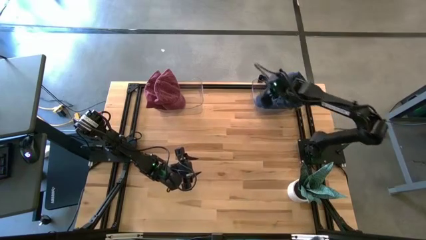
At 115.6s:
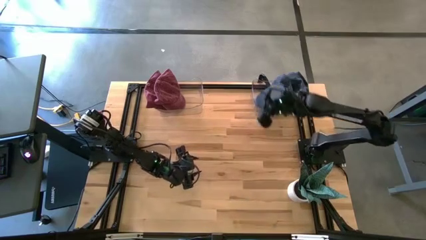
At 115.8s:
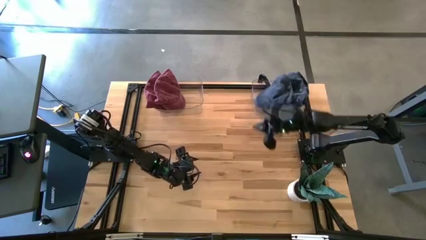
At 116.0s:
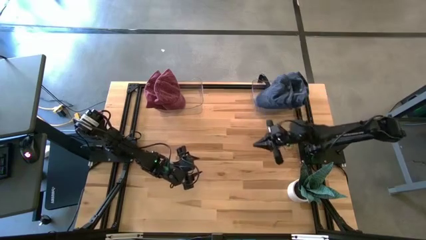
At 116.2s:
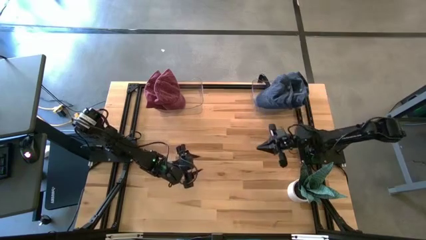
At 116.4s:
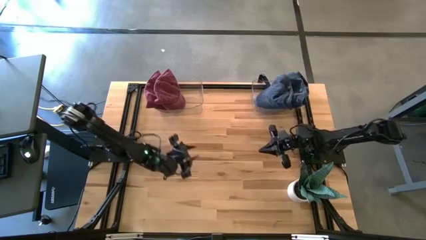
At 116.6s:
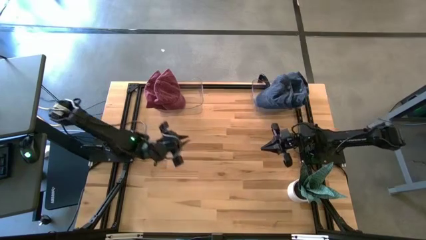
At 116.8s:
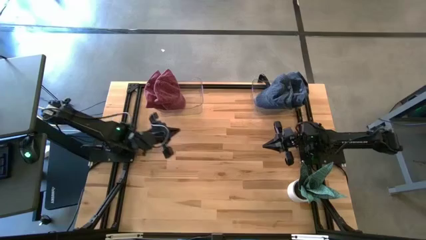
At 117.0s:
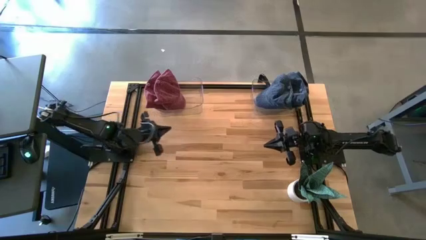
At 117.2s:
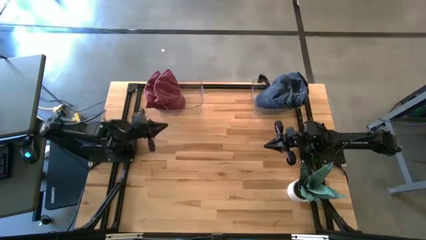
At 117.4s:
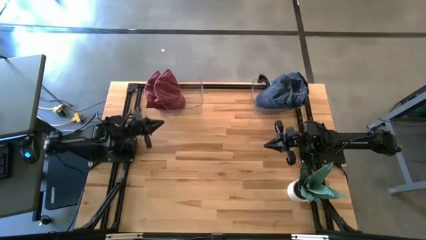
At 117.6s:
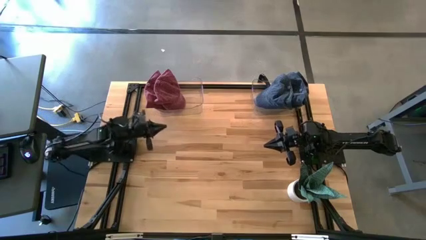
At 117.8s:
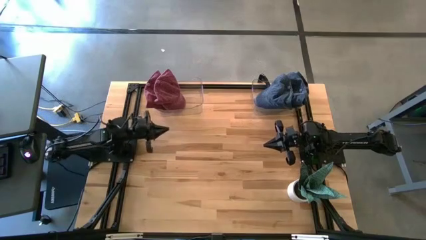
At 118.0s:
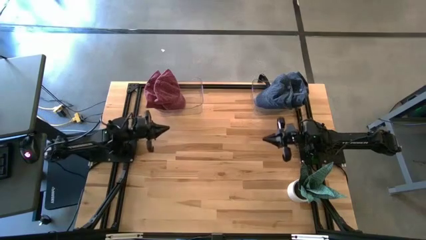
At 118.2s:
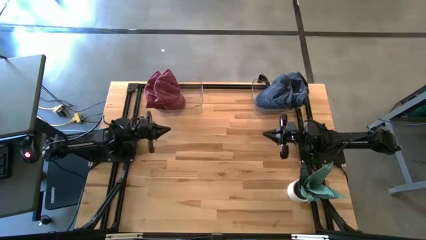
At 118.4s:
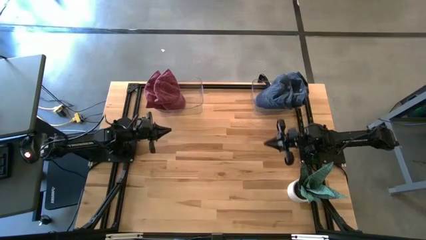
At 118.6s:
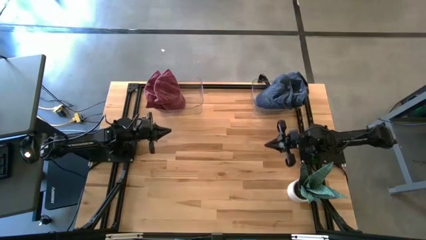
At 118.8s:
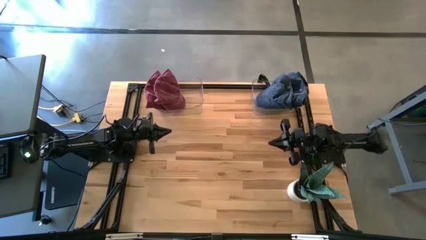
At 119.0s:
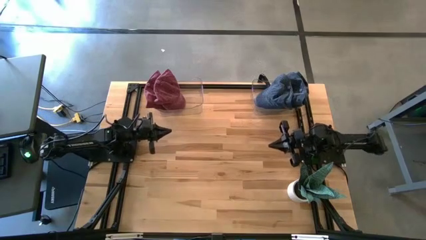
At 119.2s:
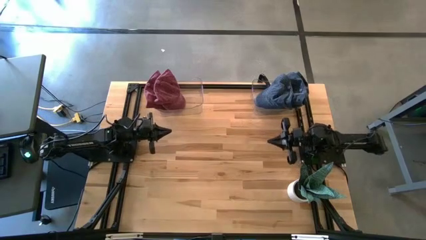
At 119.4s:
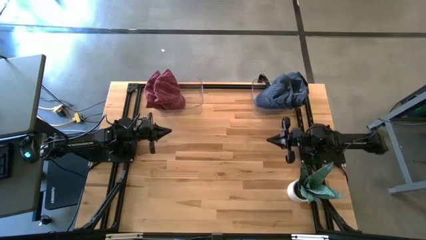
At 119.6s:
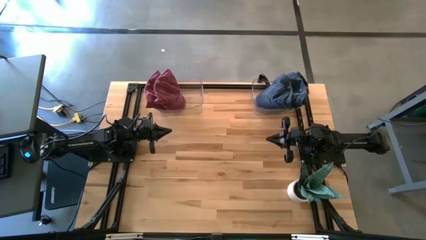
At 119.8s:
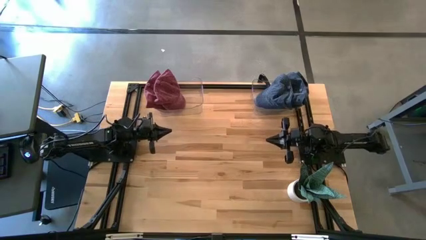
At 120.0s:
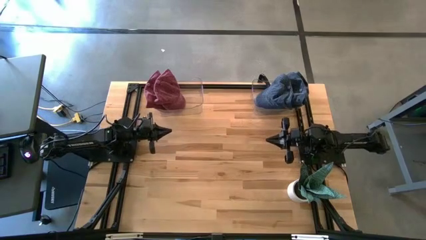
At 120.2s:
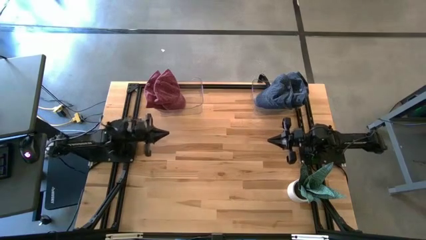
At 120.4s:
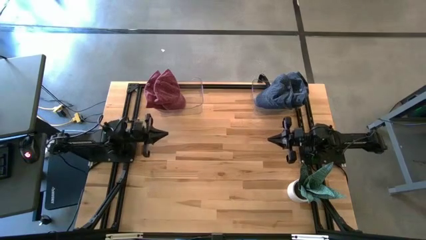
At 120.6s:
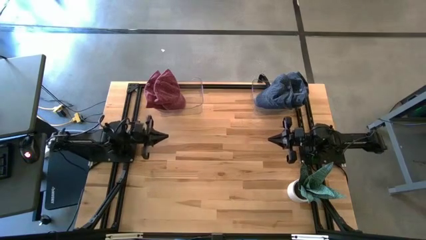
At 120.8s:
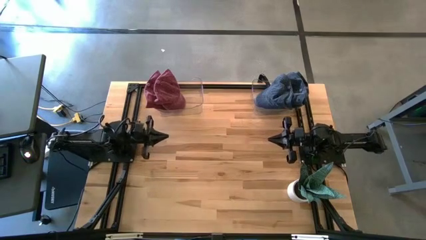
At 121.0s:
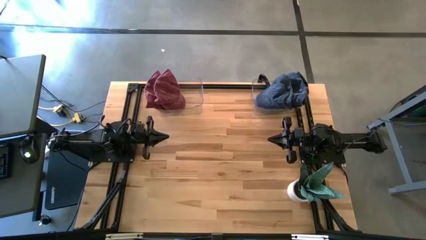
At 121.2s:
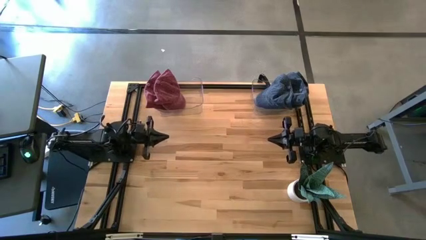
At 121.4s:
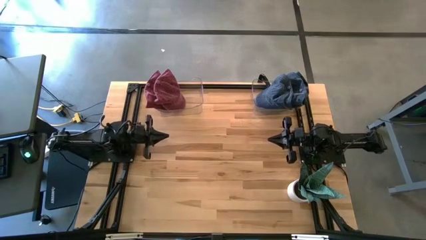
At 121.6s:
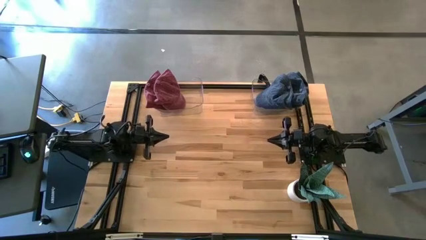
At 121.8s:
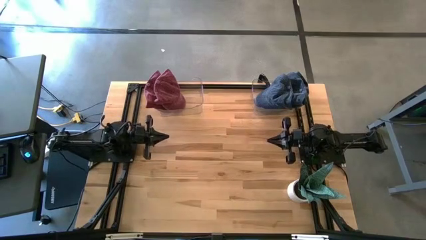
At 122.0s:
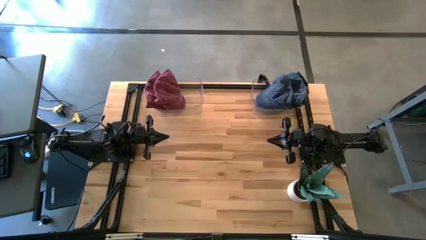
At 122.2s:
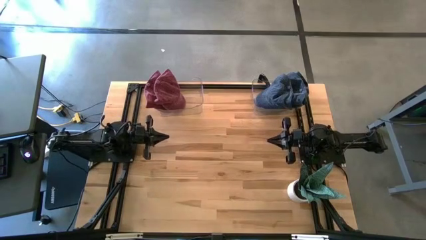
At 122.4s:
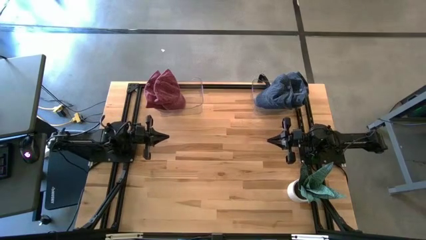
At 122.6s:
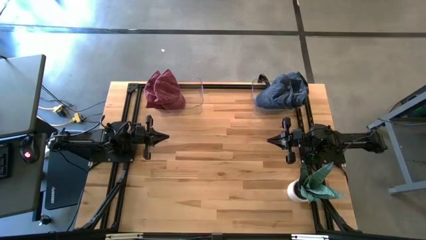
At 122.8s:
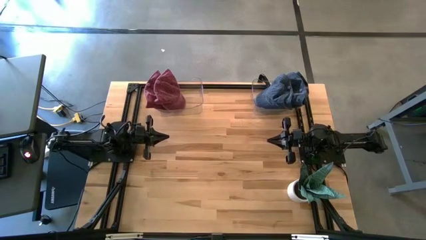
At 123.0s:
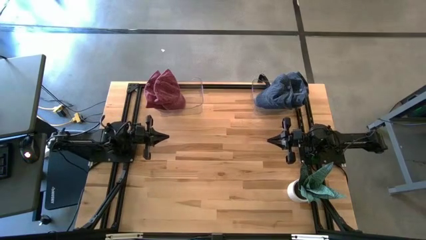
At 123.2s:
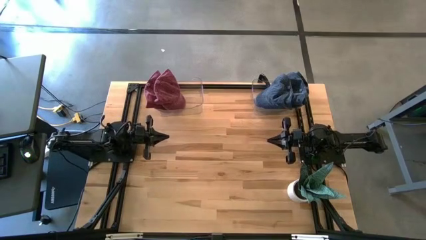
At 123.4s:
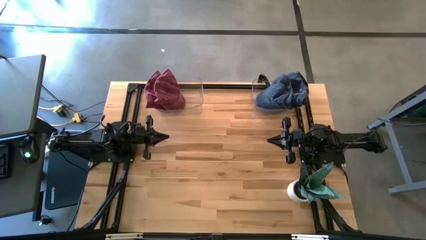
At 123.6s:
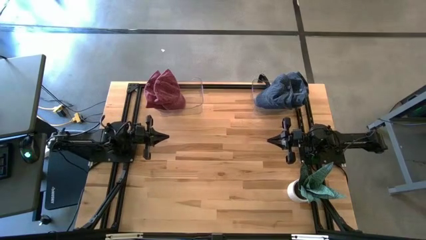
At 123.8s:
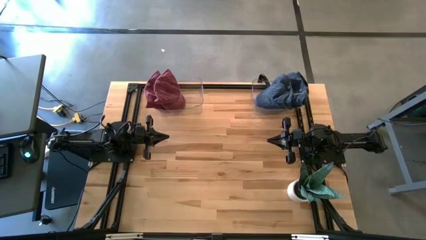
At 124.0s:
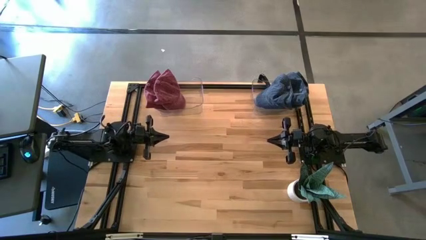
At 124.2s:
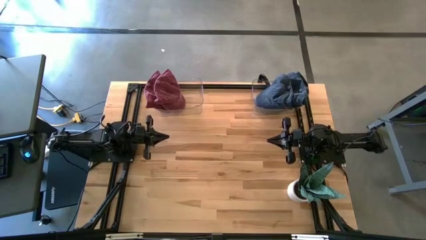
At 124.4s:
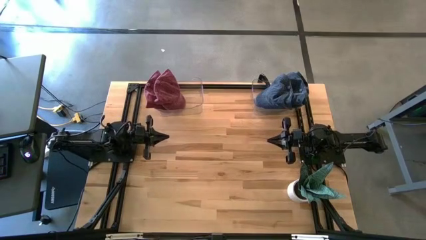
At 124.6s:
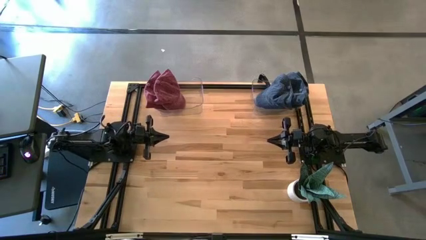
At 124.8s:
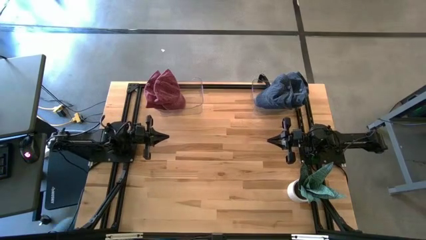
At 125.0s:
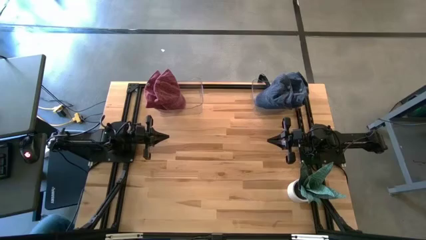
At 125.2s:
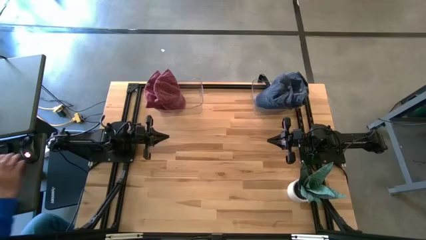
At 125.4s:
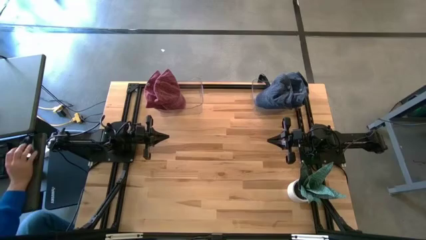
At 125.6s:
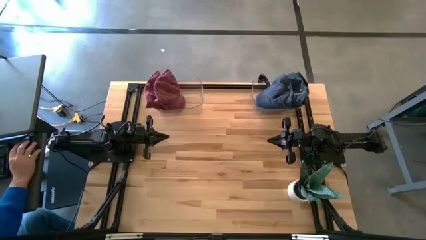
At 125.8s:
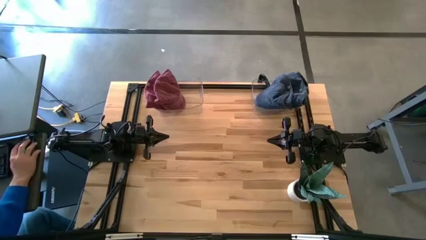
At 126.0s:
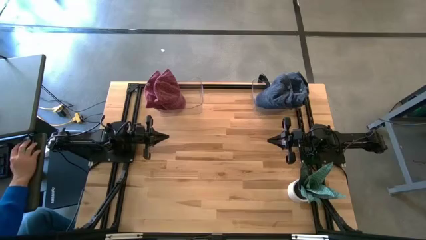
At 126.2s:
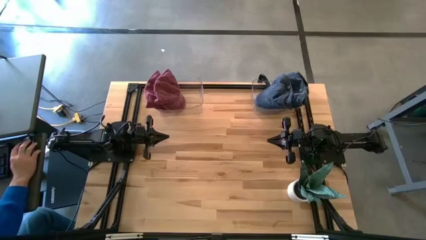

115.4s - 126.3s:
Task: Pick & Place hat
Return to Home Position
